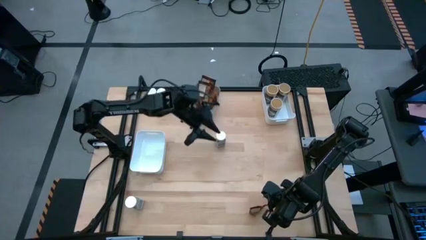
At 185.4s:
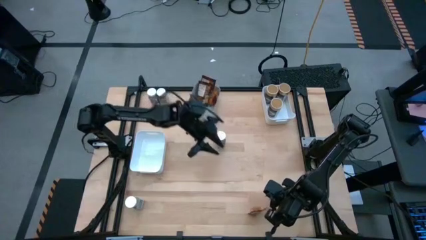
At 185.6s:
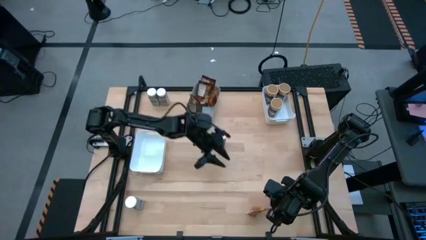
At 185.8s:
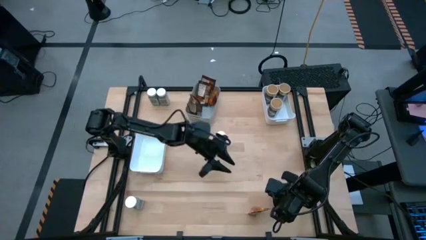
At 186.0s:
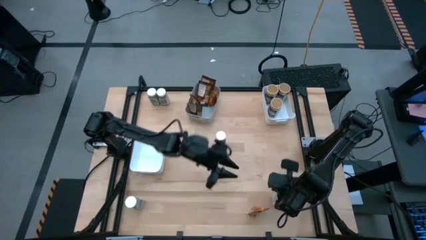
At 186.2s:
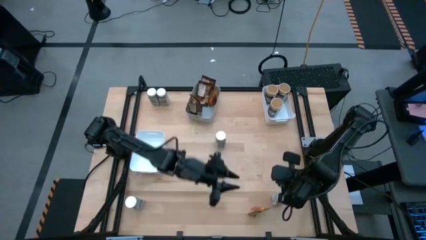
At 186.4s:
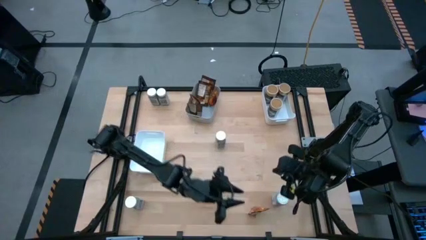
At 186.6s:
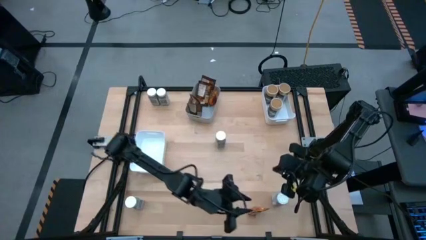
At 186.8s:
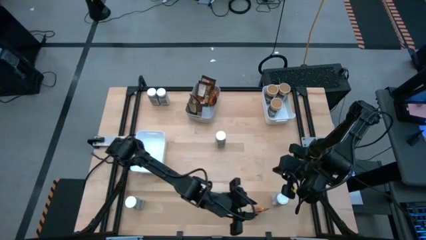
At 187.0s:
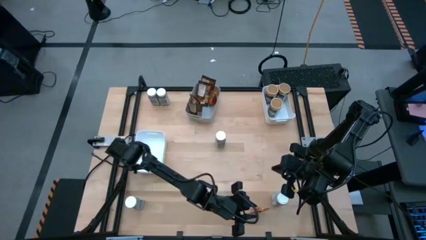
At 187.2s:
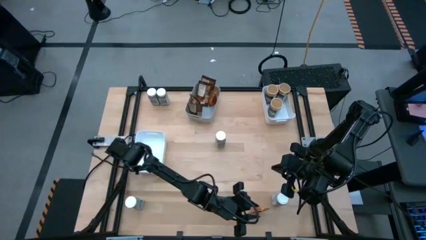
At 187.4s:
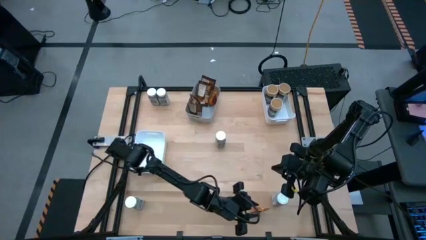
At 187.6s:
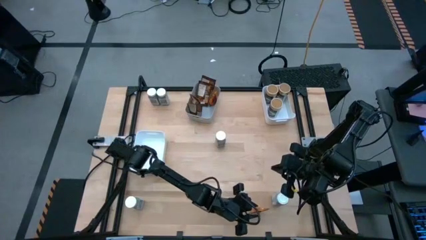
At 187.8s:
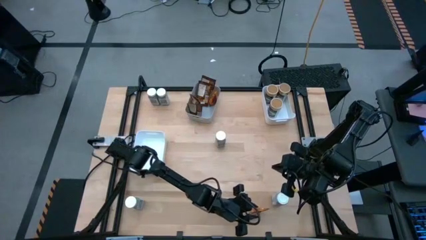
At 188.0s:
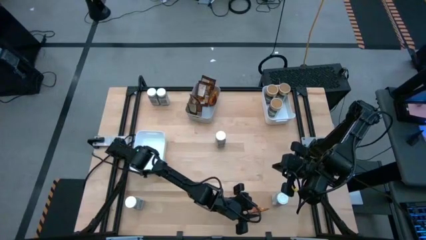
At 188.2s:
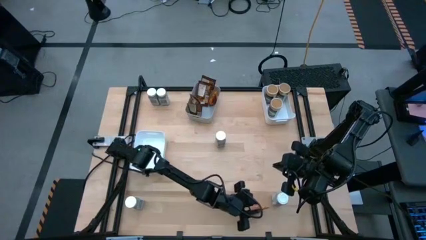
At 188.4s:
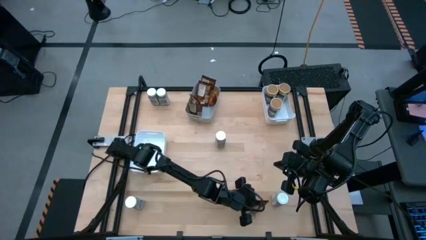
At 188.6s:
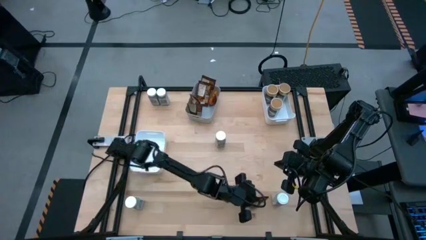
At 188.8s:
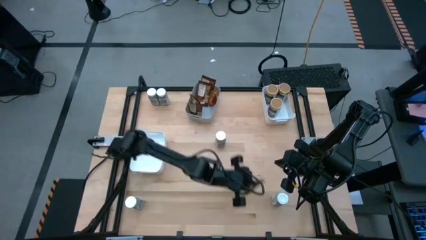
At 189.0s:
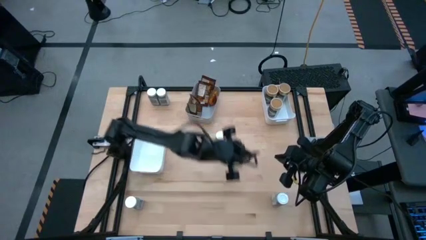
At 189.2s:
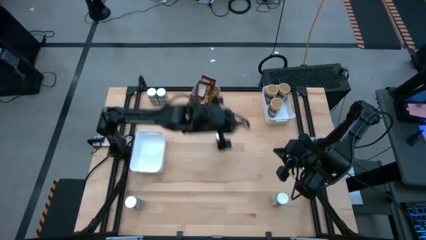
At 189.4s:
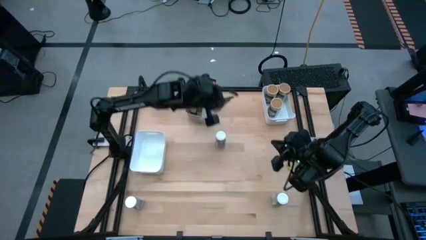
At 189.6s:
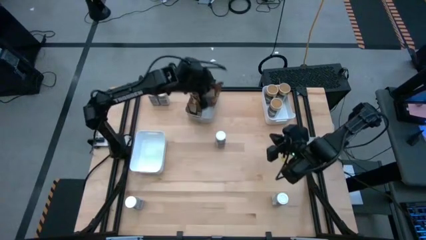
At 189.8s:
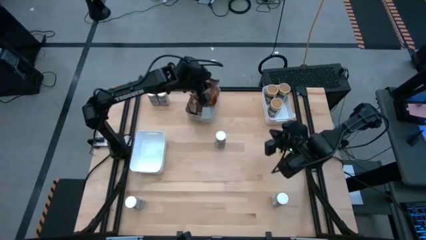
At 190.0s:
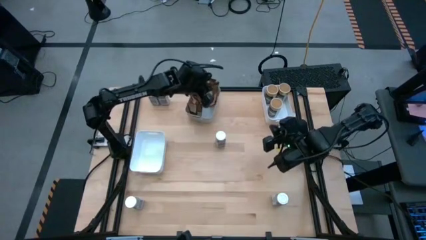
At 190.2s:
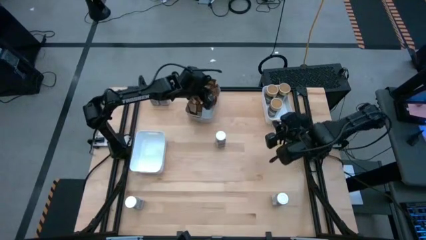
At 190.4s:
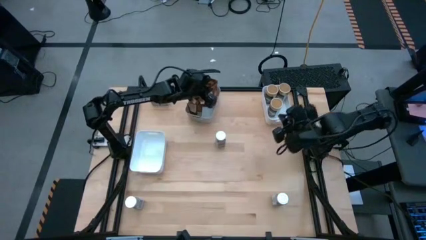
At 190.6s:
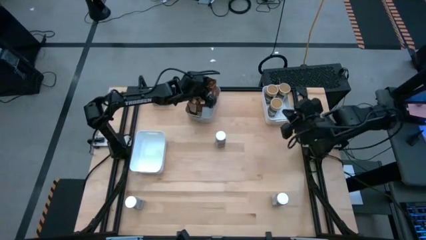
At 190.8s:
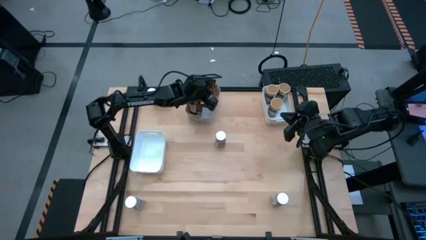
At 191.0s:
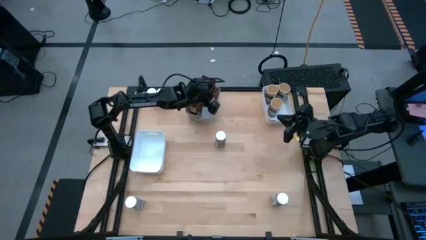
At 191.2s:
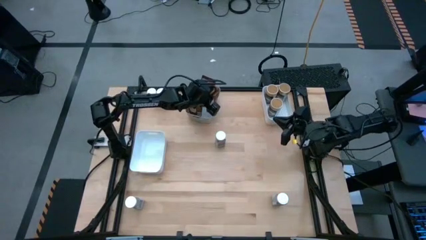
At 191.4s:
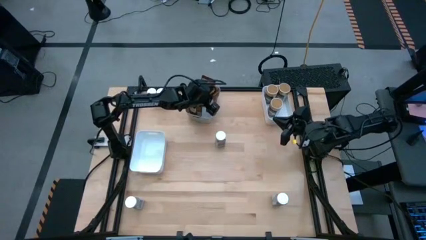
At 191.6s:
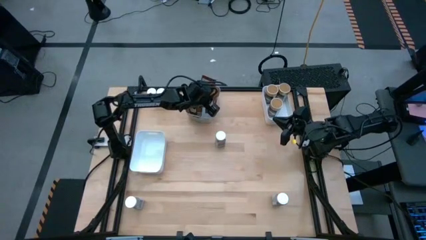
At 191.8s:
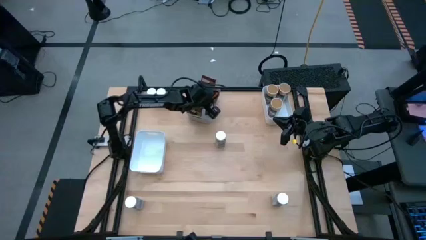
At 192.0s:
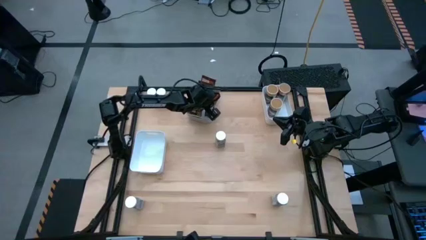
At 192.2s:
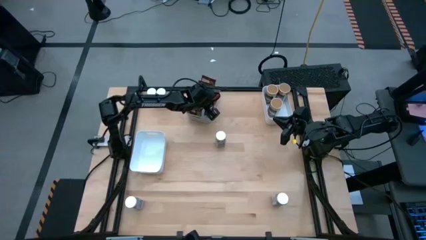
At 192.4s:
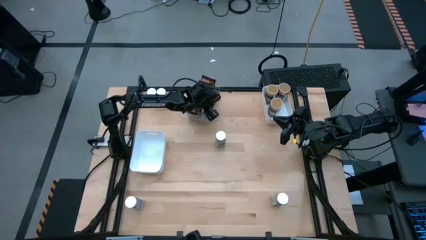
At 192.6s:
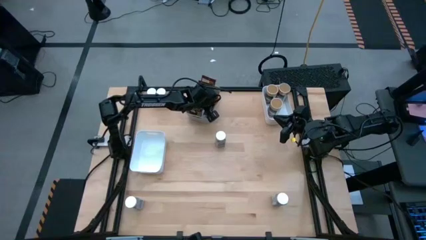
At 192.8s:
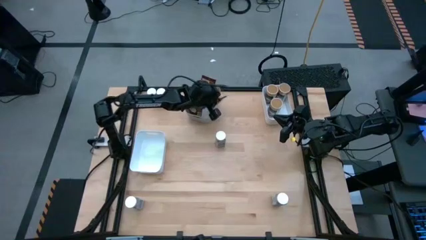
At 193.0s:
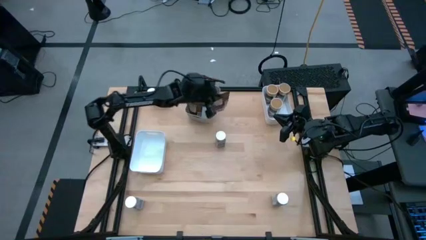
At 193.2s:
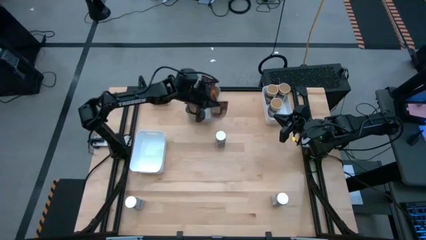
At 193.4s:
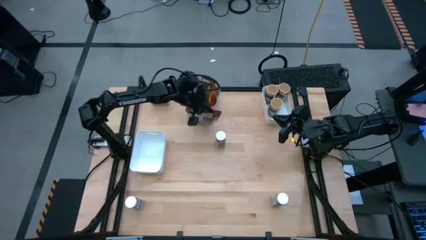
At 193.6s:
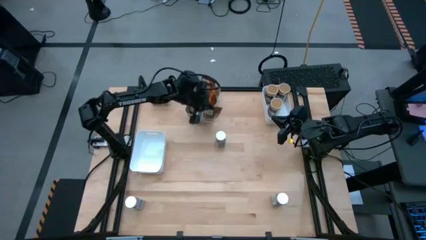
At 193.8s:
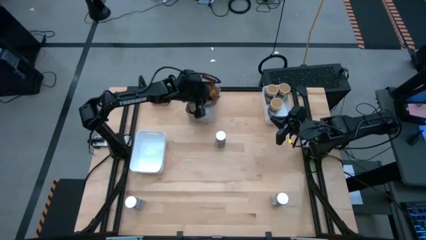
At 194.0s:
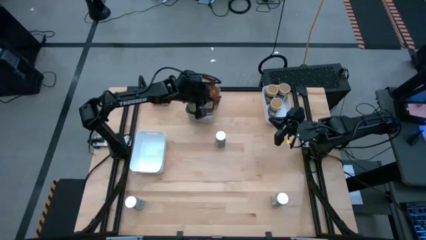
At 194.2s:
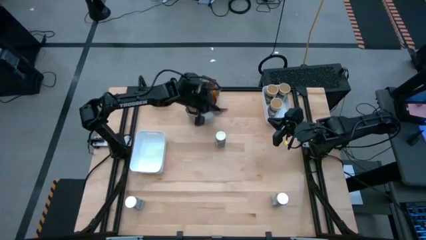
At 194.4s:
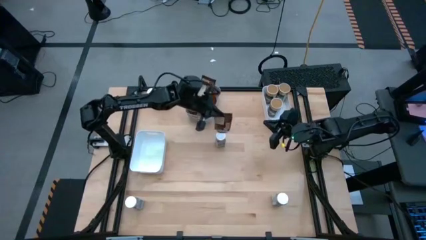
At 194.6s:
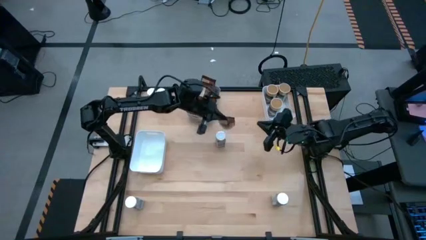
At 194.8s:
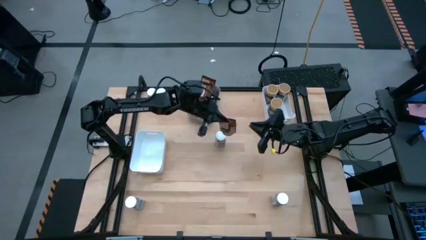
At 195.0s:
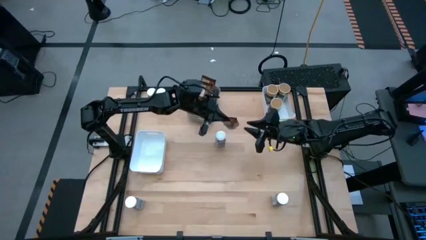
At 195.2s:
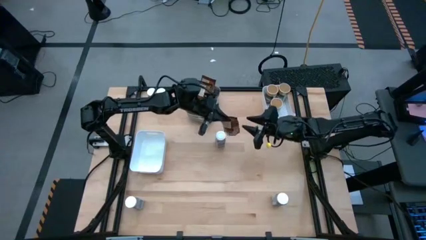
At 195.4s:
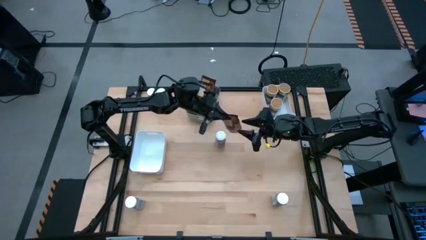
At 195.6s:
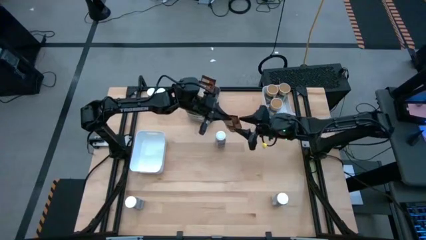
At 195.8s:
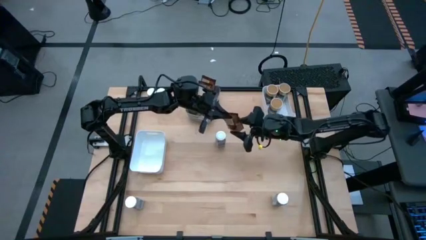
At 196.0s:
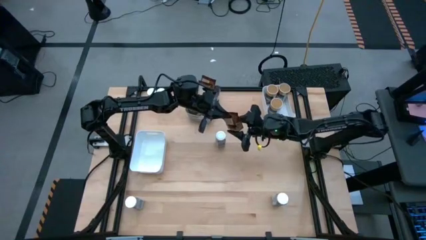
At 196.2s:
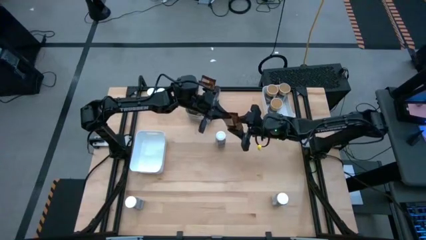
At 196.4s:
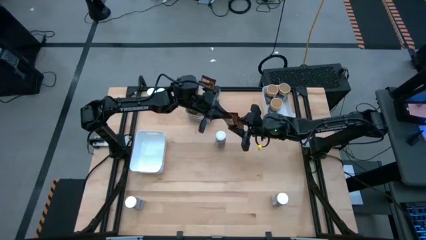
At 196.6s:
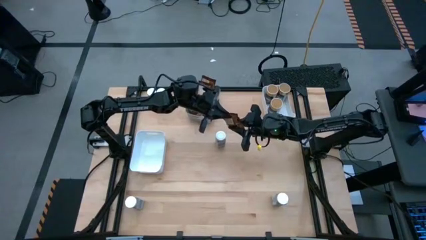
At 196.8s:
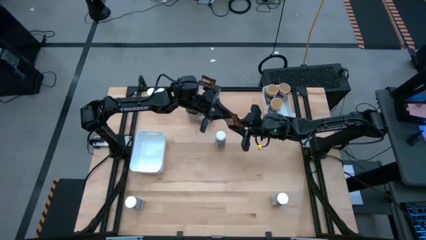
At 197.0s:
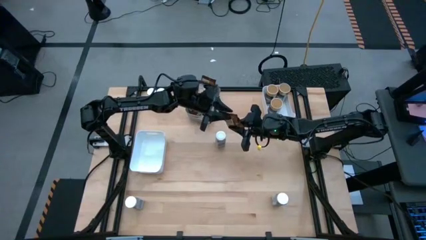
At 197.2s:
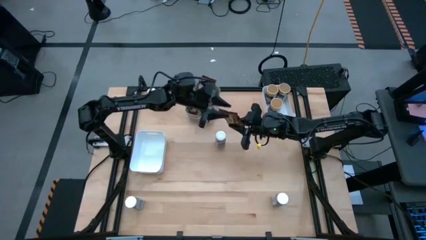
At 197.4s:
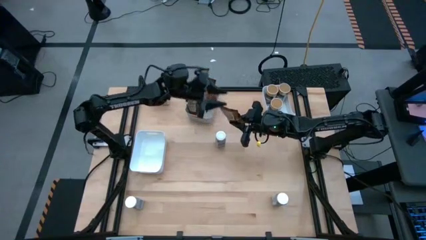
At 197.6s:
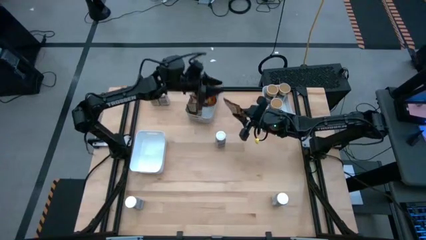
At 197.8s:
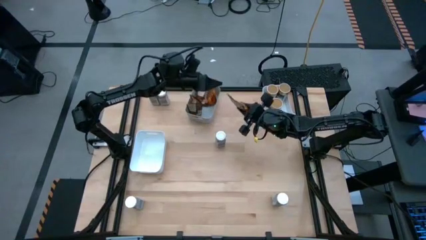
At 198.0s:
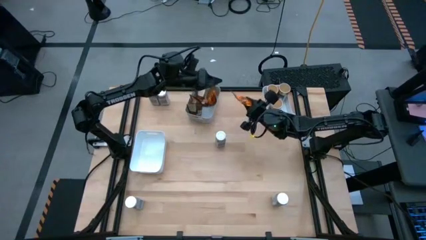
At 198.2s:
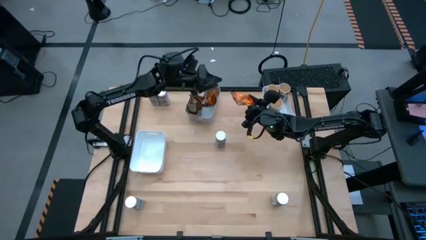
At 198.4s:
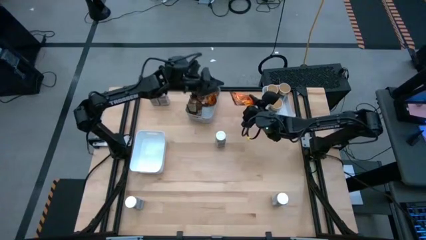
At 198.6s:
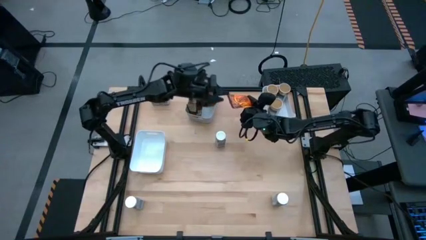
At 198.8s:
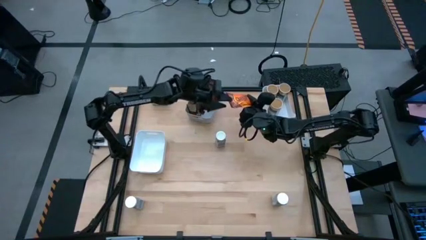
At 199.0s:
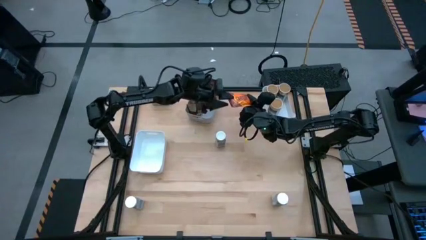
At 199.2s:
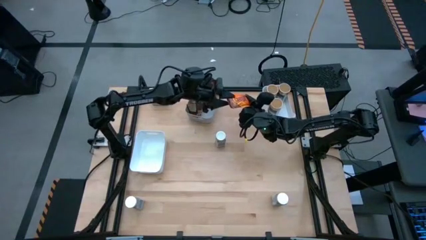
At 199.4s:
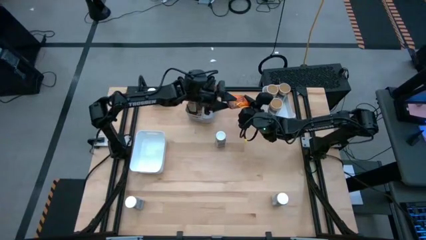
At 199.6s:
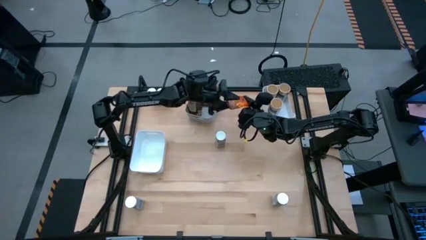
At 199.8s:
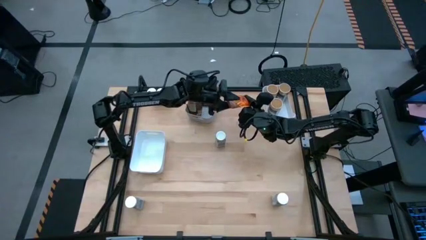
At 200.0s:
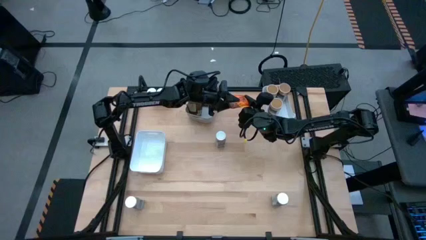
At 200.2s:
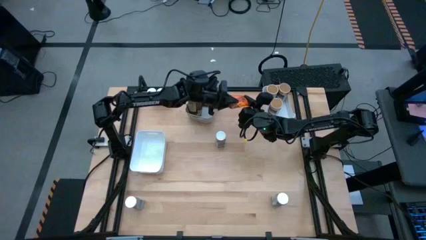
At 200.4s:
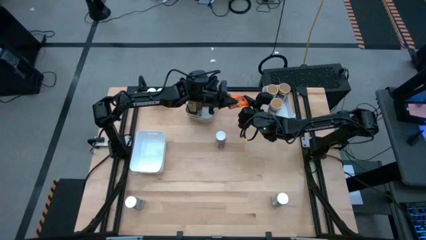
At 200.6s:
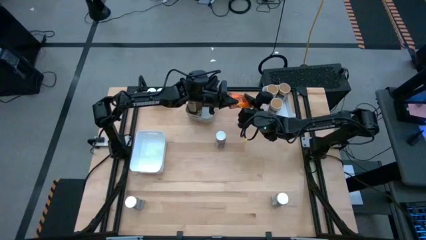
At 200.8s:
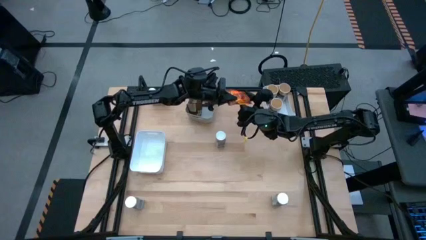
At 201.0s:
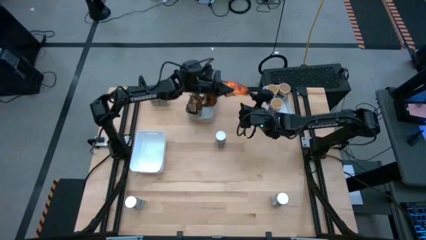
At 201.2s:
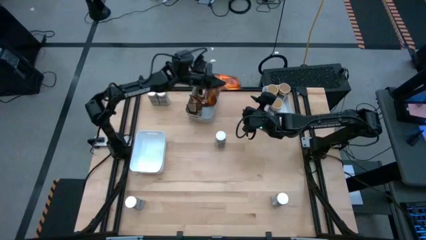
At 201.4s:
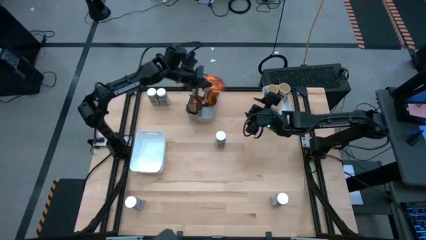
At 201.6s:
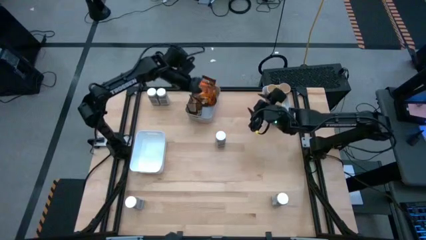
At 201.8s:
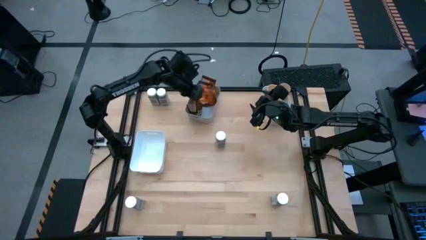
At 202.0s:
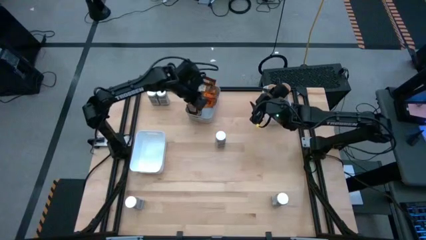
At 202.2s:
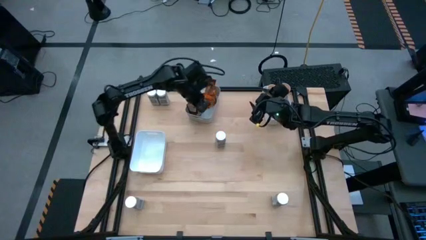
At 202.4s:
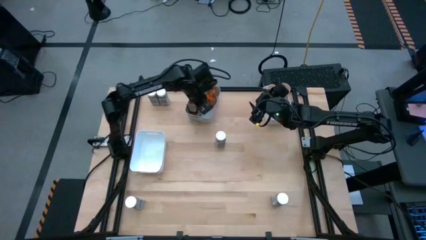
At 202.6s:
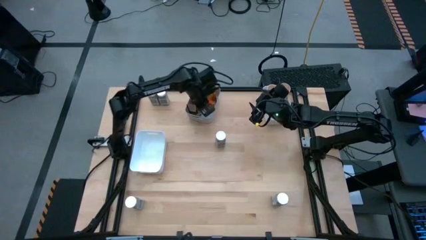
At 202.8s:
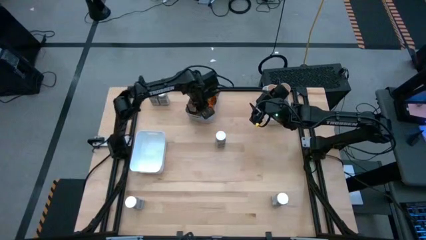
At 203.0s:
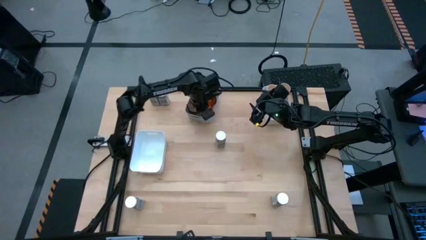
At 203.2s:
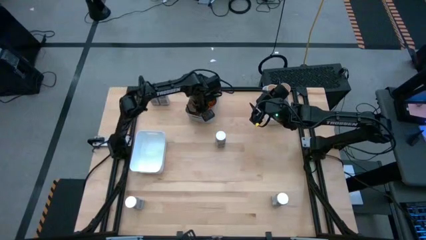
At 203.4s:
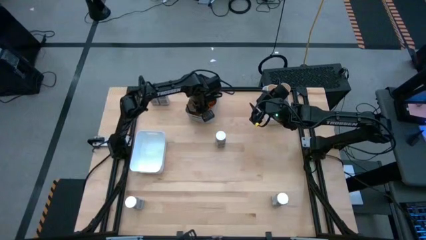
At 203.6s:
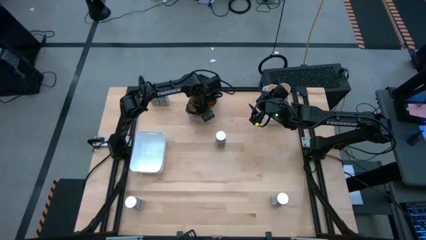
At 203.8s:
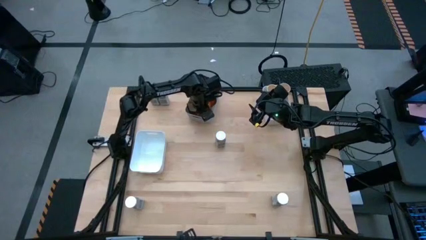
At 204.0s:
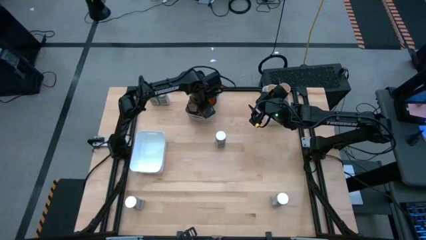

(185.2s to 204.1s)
Task: Sort spices by type
Put the orange spice pack on the gray bin
